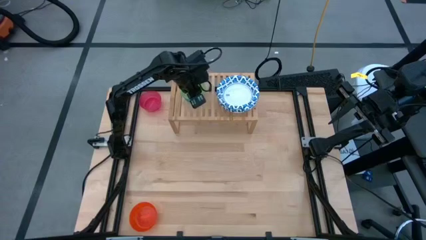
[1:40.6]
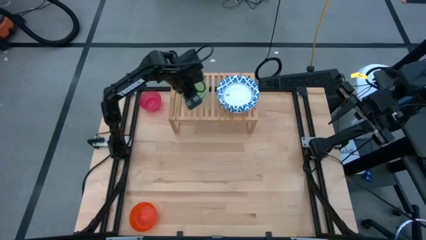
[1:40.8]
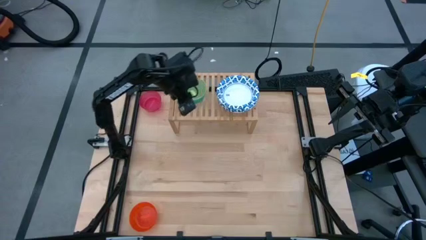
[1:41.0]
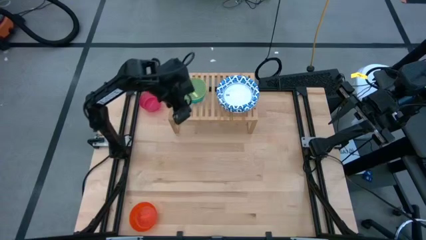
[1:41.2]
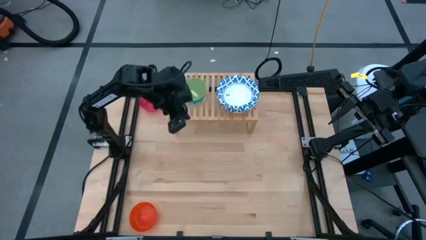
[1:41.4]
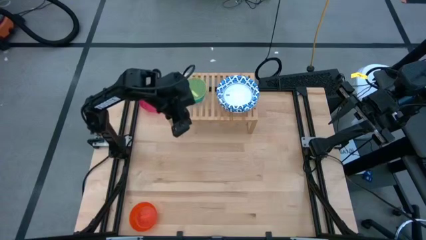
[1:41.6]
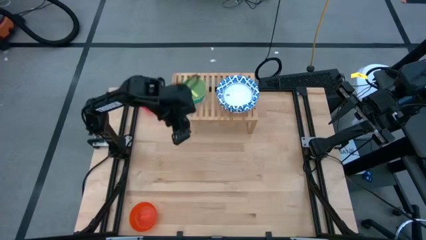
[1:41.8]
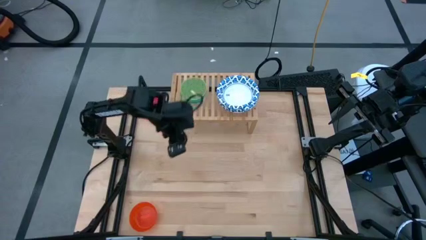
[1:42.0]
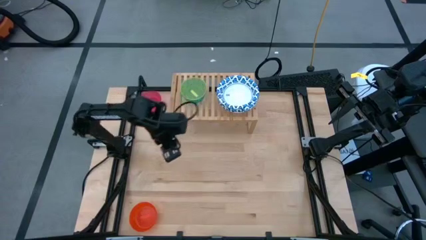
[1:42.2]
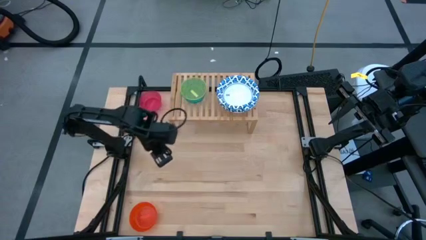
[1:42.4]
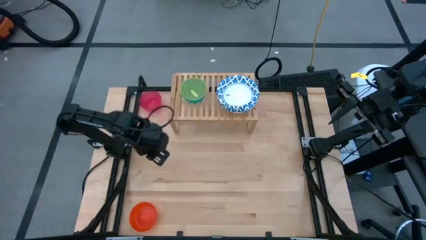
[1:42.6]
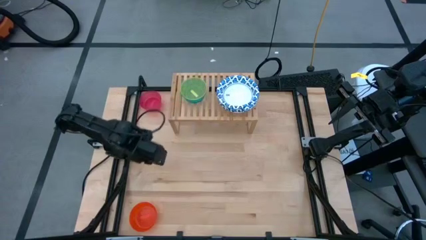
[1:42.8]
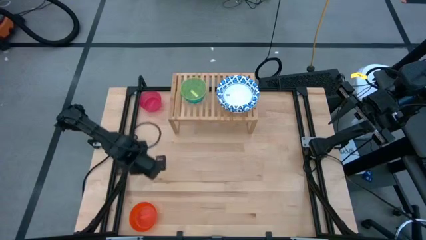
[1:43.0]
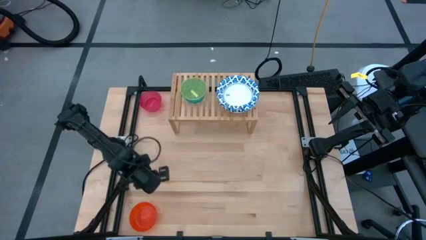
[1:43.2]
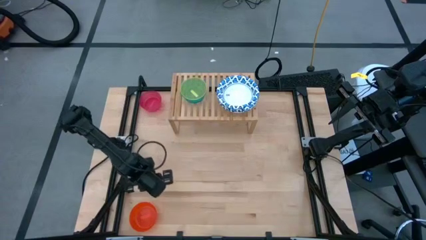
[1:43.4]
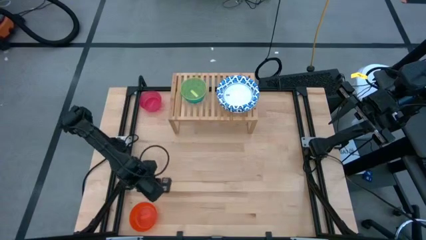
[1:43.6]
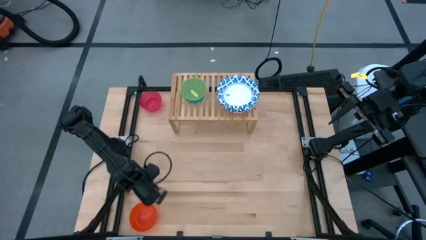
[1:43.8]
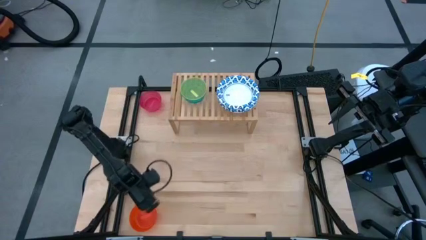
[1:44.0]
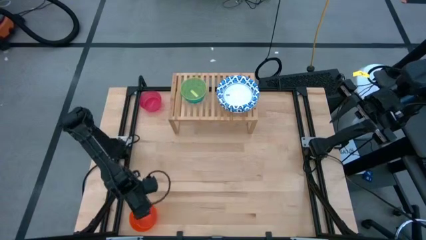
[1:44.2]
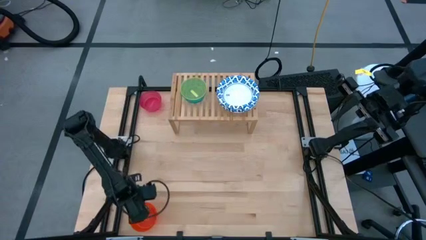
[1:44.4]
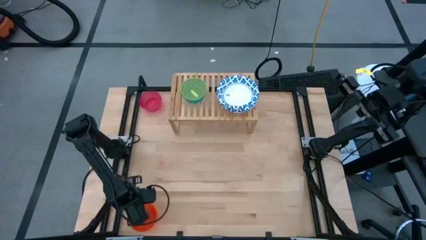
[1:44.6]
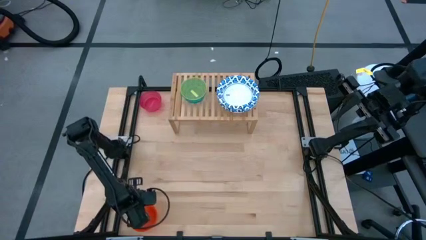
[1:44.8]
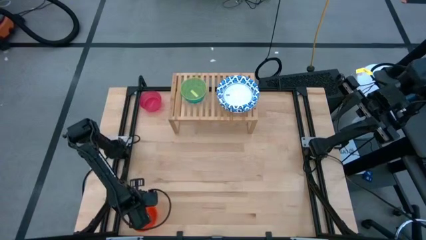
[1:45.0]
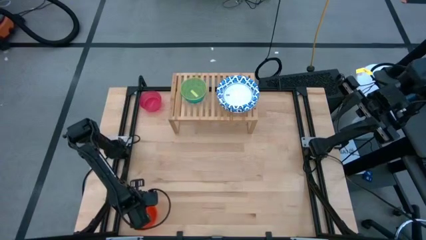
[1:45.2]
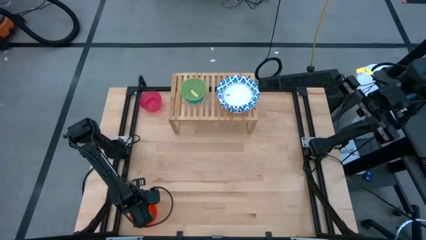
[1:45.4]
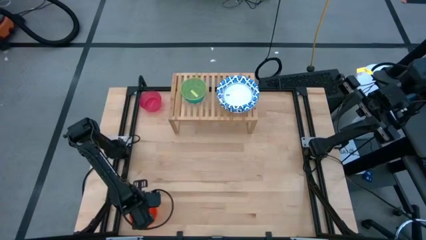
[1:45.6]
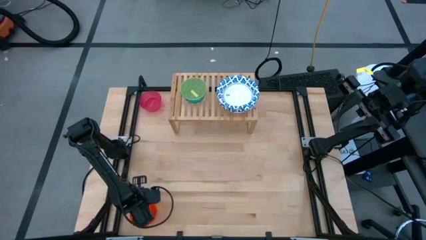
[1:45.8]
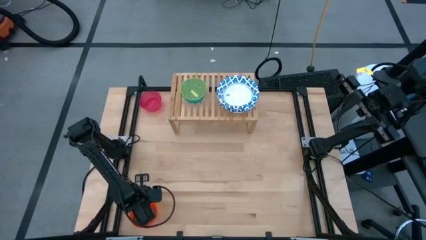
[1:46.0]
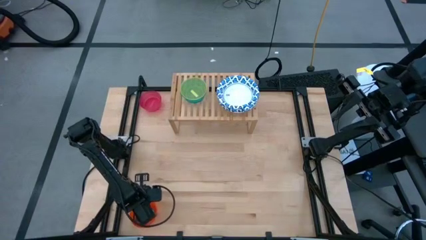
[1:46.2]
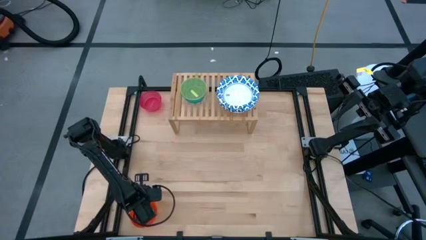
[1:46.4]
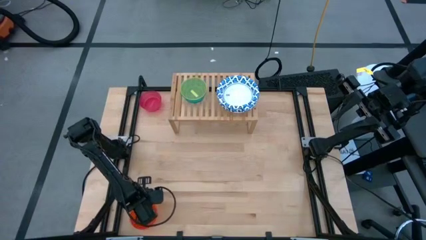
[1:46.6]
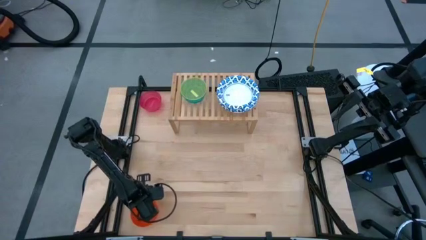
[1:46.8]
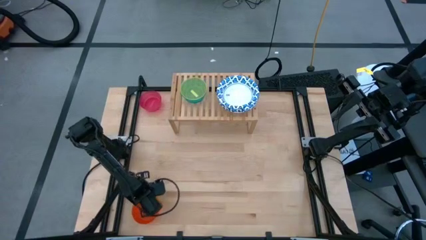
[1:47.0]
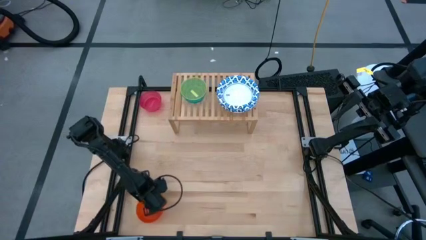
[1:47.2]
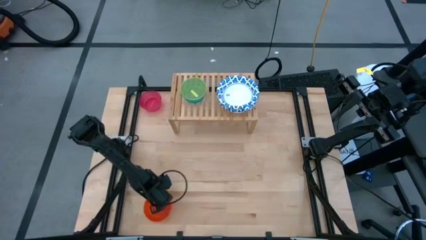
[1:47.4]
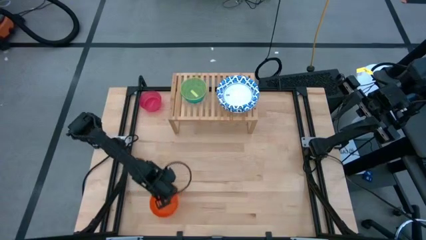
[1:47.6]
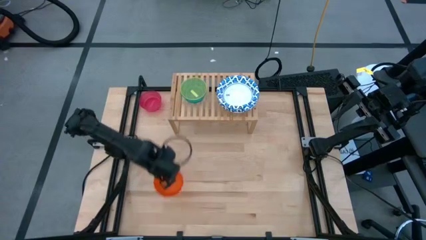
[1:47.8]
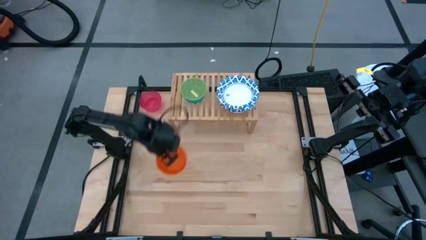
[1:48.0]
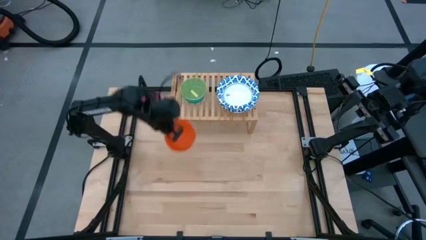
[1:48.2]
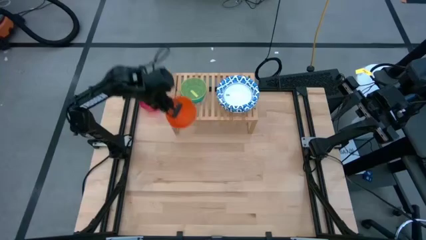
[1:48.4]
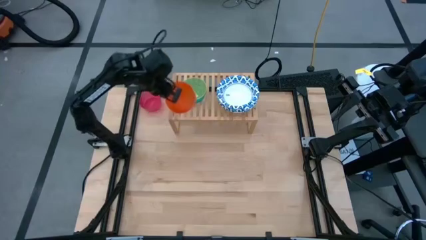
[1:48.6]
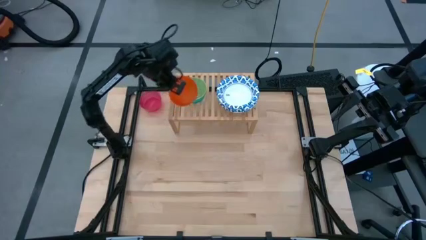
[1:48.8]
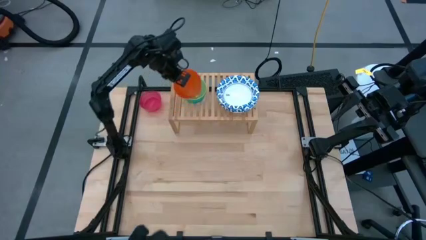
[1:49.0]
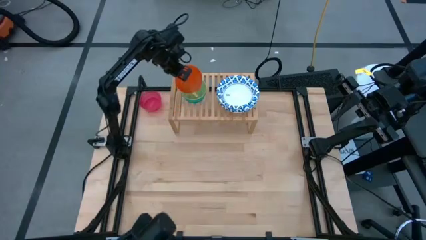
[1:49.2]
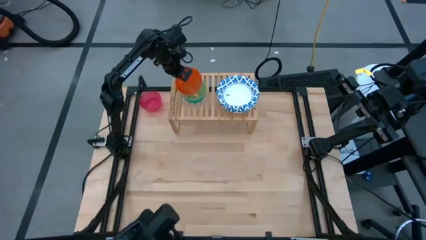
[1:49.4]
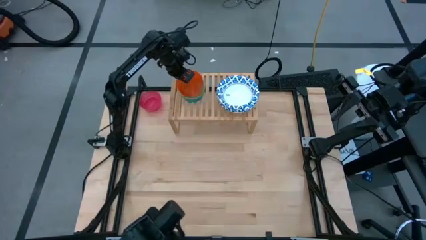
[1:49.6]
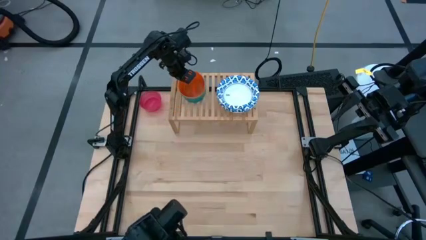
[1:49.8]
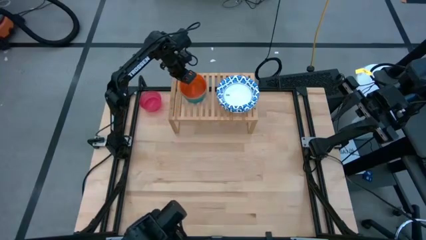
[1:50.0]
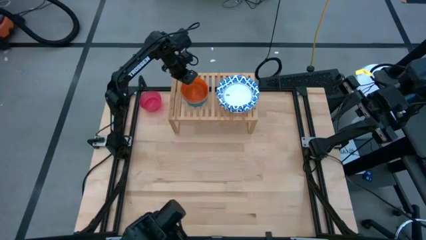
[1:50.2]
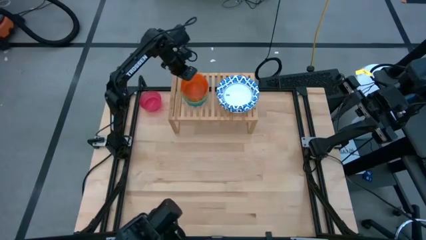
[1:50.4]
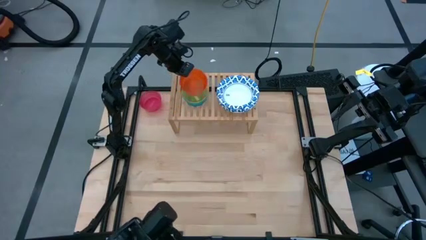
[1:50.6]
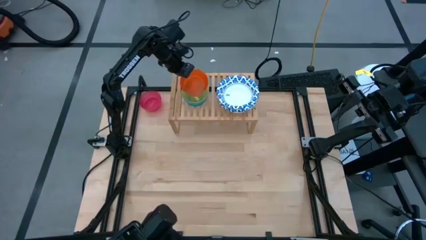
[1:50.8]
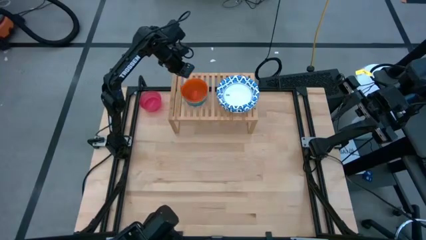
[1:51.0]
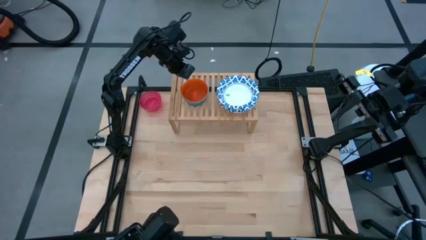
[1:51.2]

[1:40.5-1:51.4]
Task: Place and stack bowls onto a shelf
Stack the orange bowl on top of the yellow bowl on the shelf
